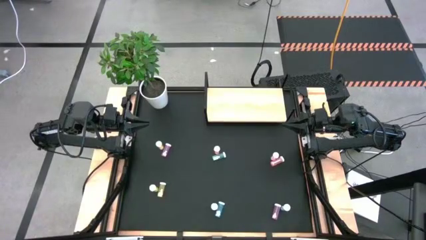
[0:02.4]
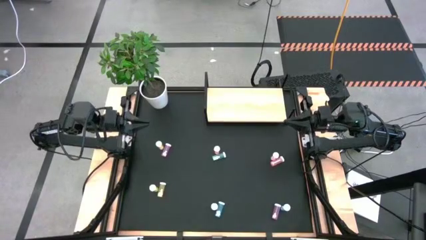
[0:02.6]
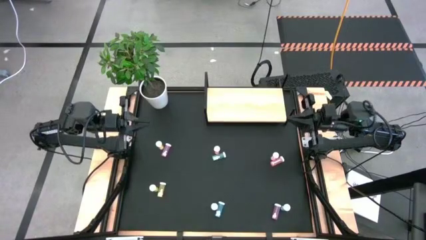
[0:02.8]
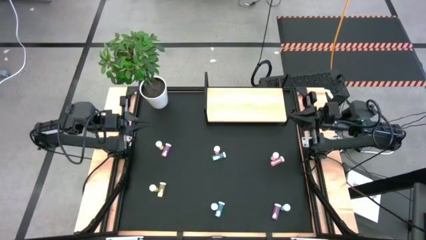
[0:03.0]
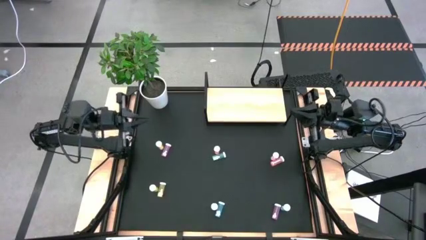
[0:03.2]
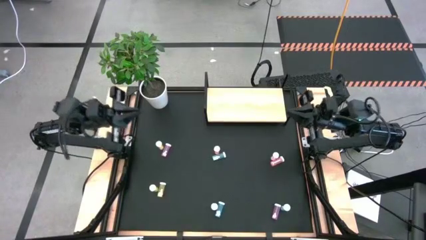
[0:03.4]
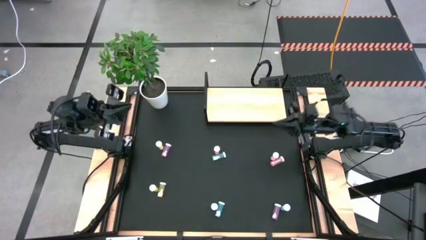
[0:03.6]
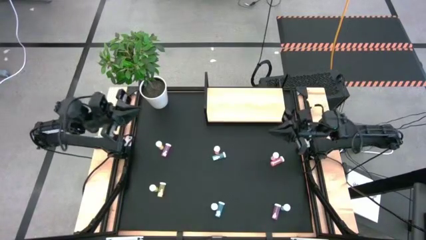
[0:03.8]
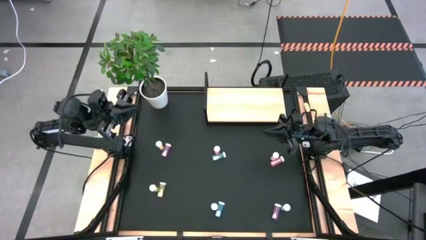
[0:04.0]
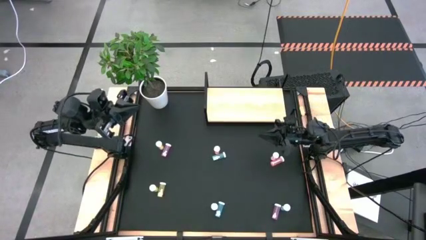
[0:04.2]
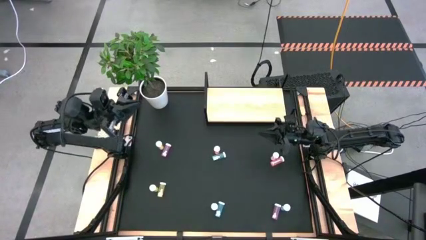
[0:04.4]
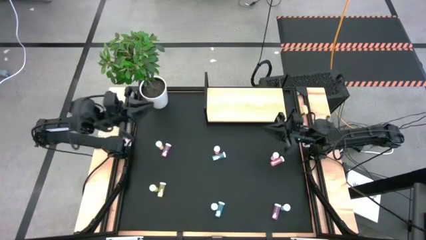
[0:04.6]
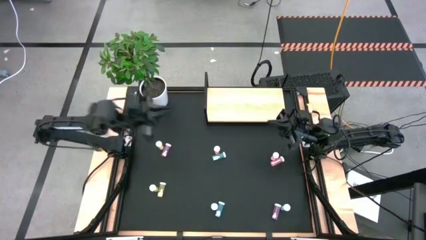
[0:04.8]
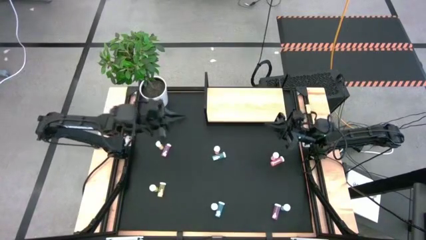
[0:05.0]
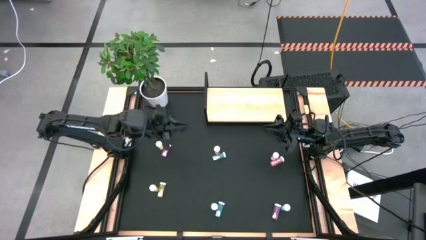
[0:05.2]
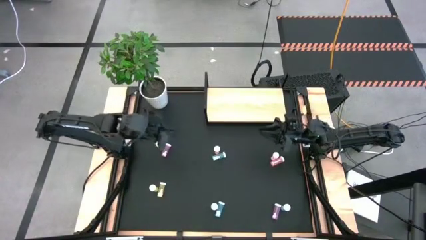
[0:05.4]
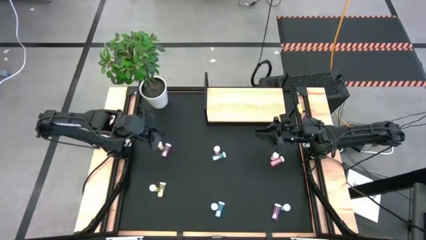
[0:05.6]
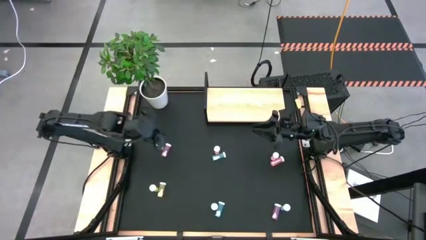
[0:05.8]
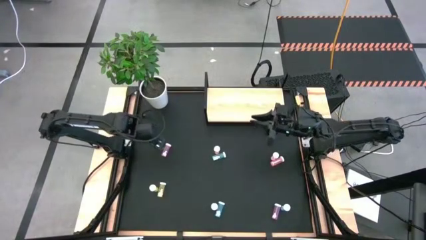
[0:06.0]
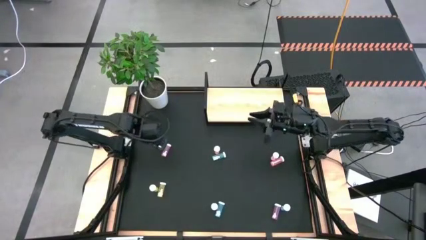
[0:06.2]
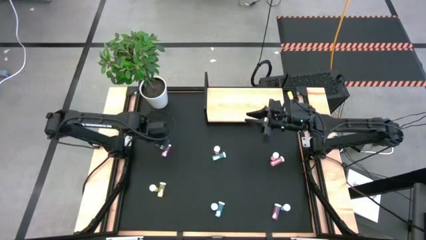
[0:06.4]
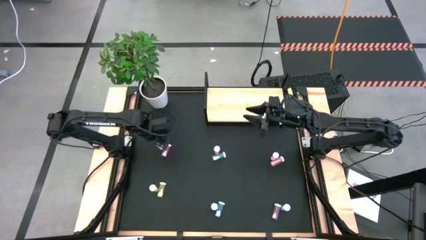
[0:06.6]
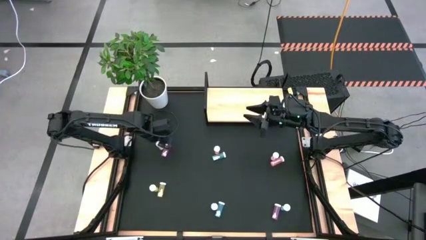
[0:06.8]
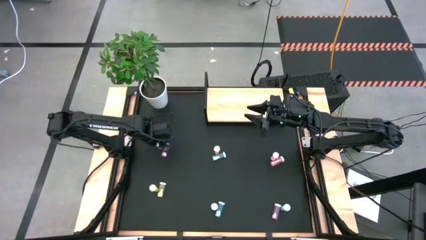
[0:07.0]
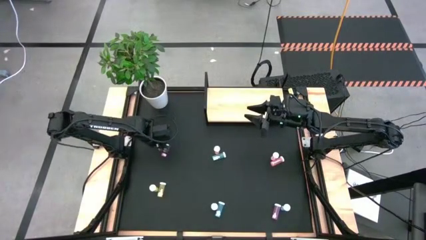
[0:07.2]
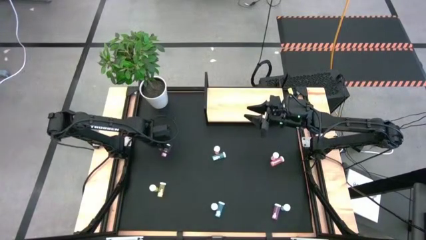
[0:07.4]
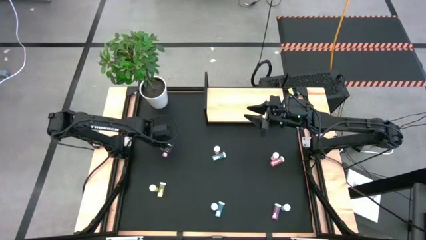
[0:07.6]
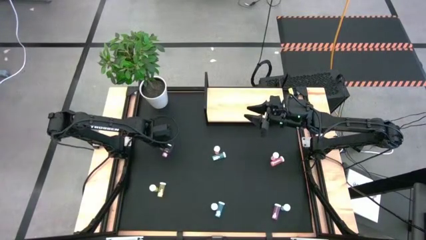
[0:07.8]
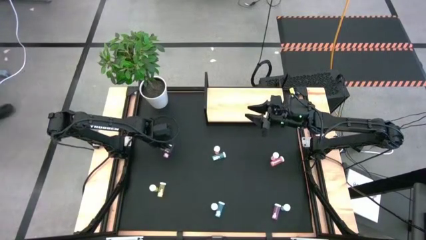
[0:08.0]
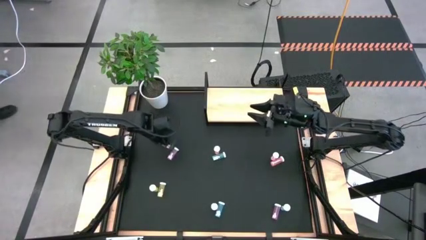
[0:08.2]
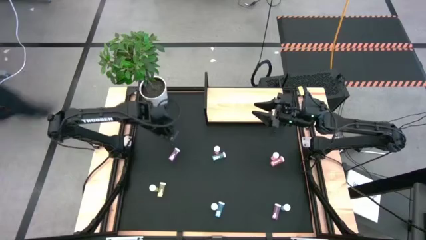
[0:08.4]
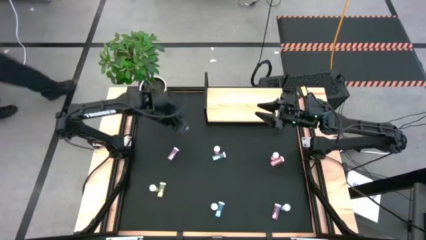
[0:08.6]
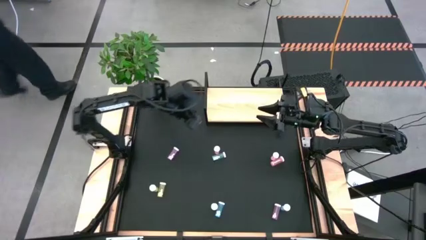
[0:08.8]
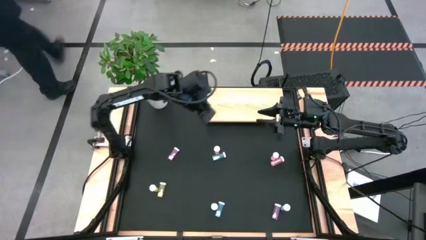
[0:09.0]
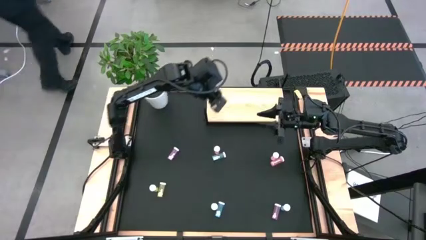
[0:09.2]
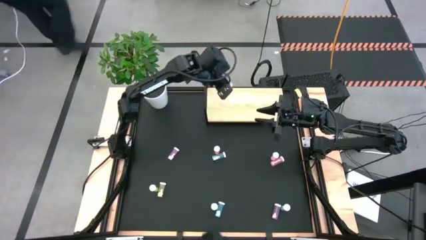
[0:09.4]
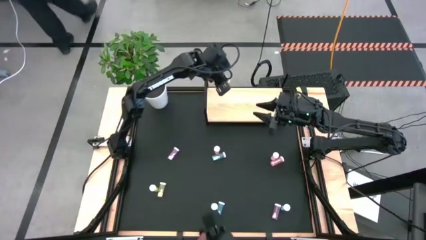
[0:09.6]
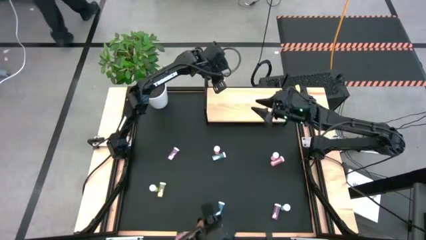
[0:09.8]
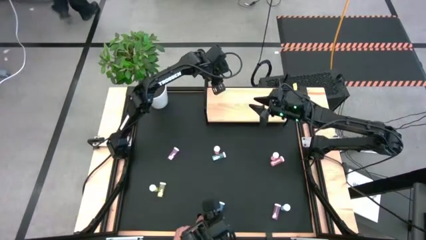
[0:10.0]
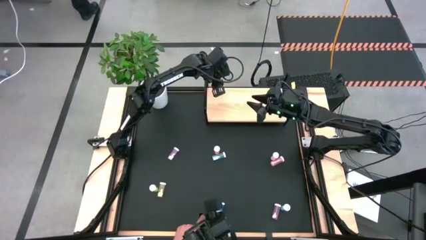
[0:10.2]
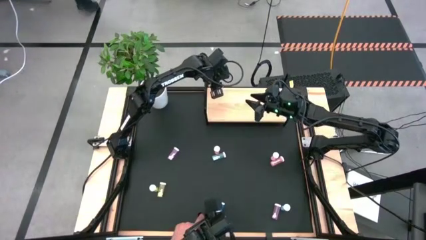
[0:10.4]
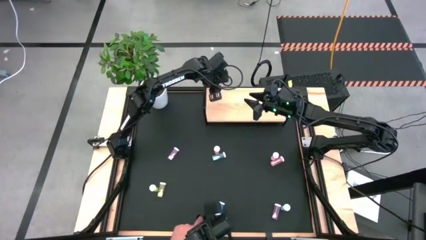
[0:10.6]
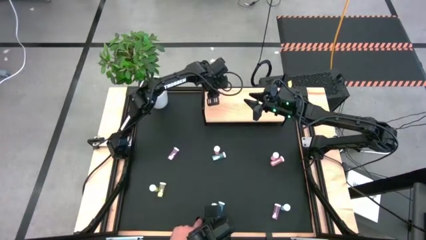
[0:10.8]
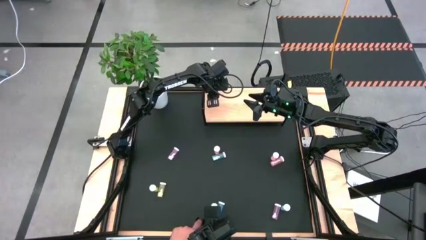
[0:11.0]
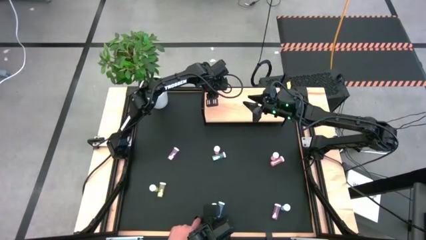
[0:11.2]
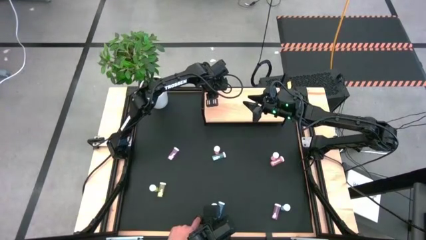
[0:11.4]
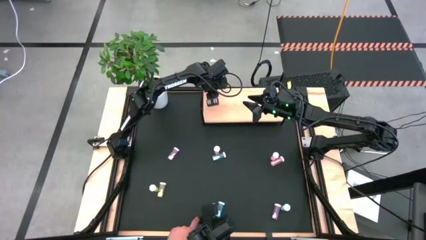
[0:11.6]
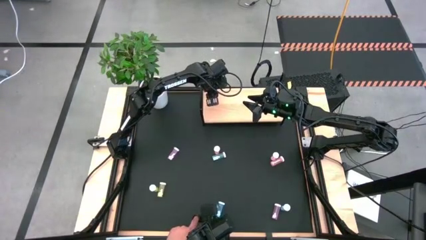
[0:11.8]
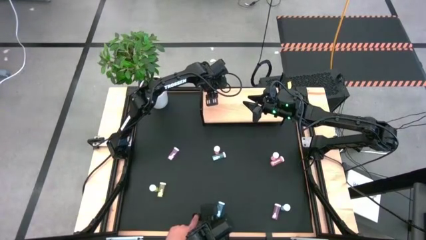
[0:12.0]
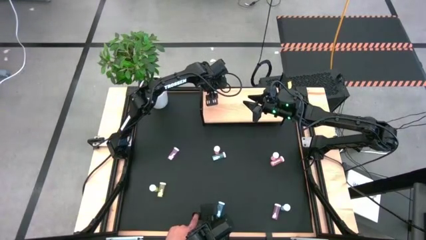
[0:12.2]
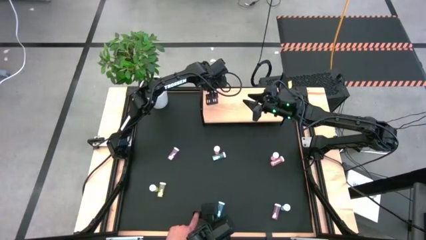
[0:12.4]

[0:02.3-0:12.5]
Task: Pick and place medicine bottles onto shelf by color
Put the top yellow pill bottle on the shelf
